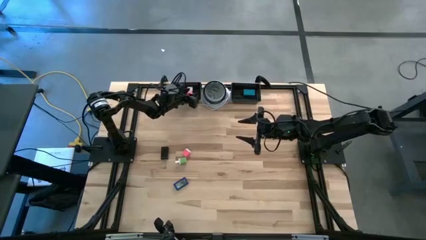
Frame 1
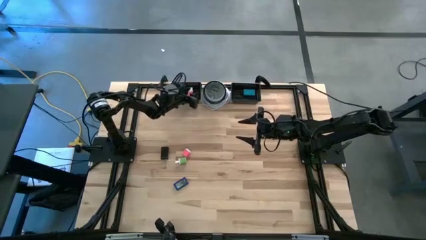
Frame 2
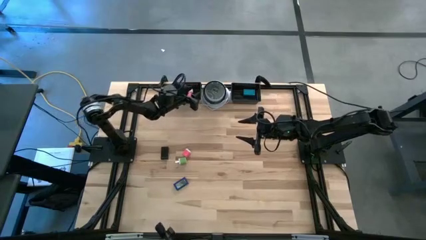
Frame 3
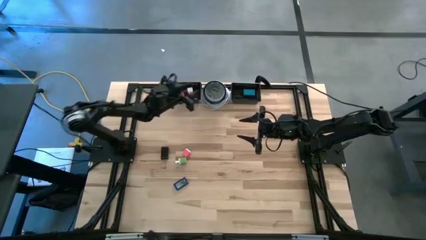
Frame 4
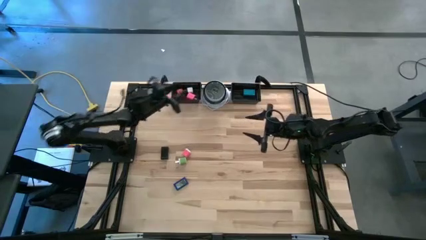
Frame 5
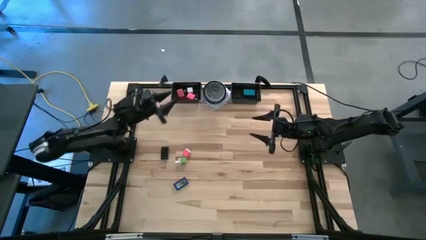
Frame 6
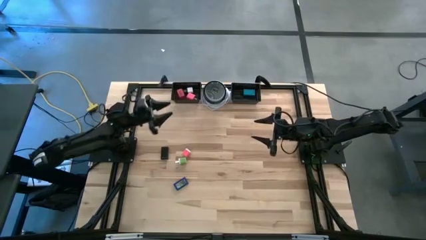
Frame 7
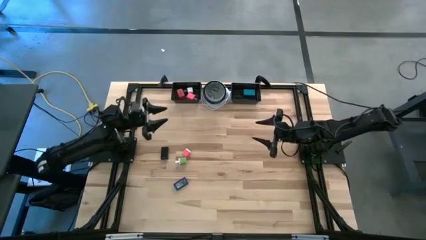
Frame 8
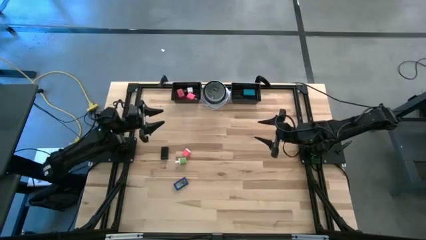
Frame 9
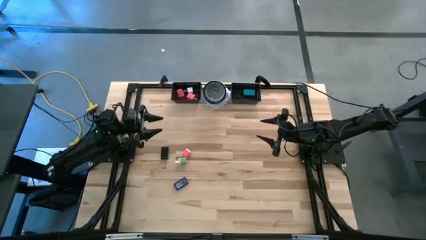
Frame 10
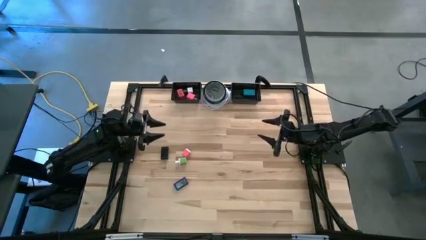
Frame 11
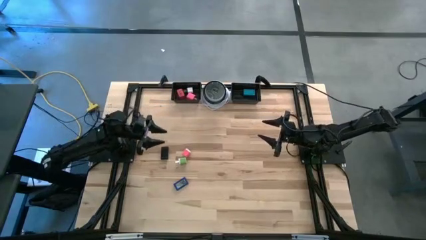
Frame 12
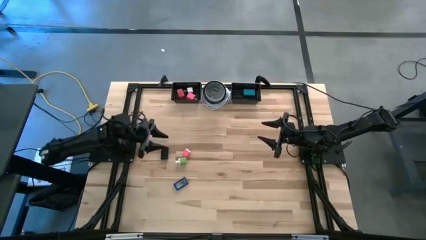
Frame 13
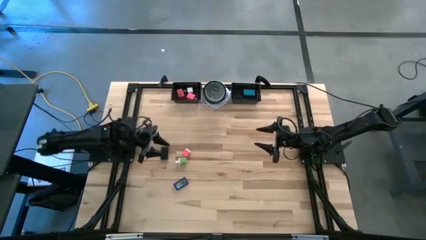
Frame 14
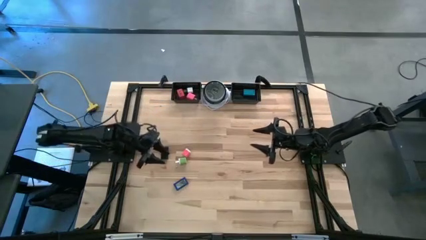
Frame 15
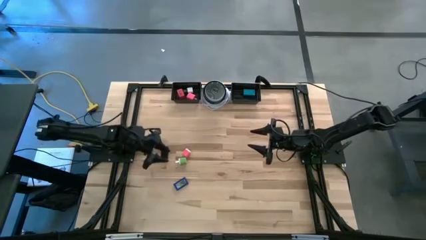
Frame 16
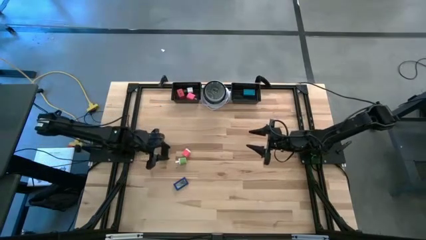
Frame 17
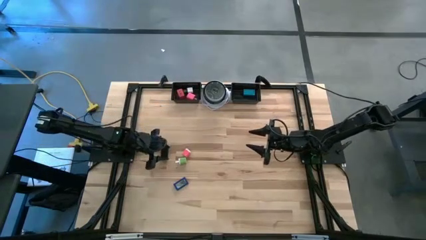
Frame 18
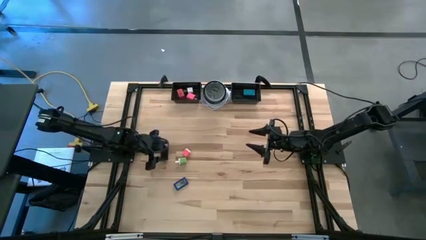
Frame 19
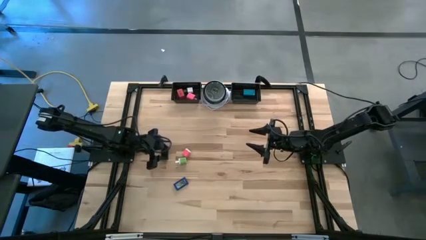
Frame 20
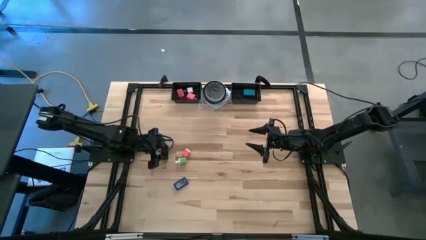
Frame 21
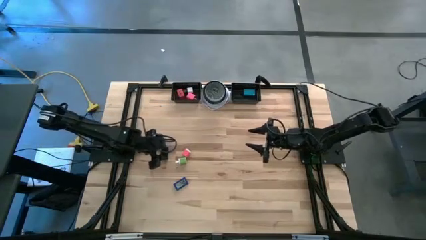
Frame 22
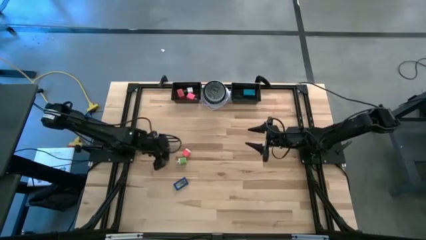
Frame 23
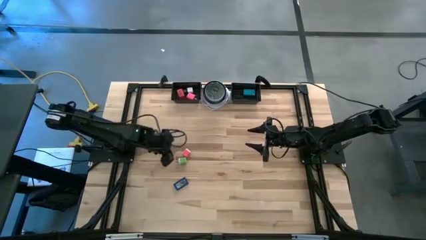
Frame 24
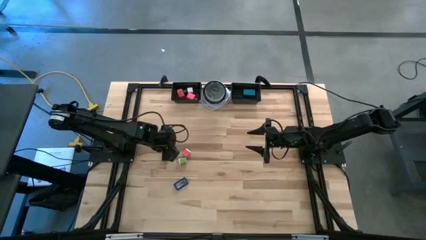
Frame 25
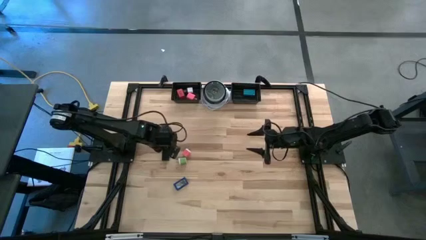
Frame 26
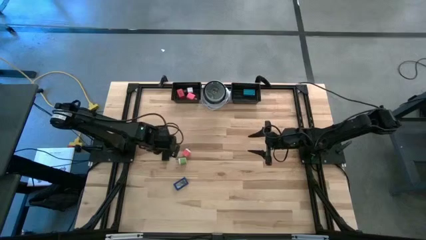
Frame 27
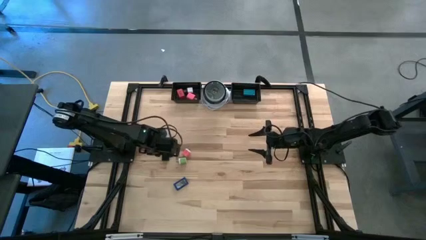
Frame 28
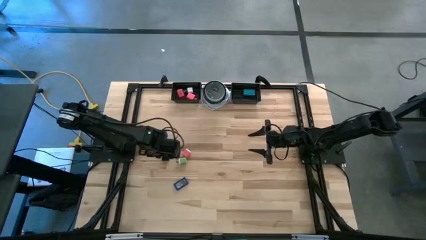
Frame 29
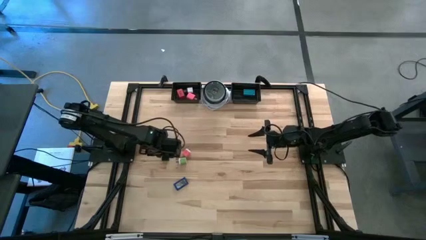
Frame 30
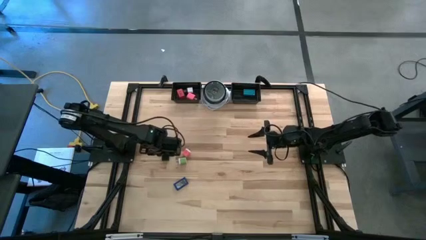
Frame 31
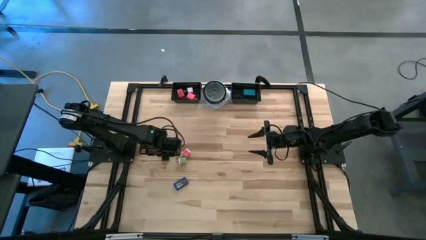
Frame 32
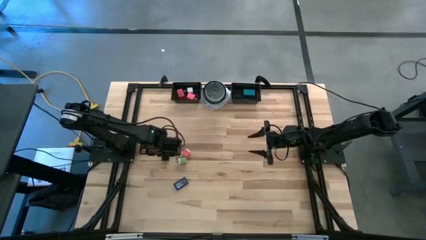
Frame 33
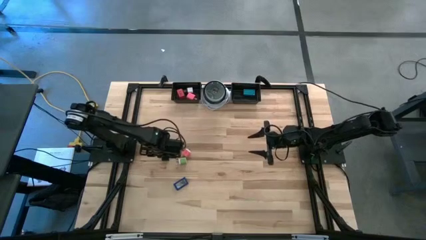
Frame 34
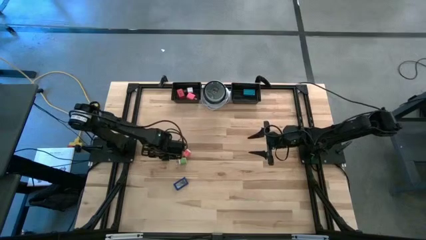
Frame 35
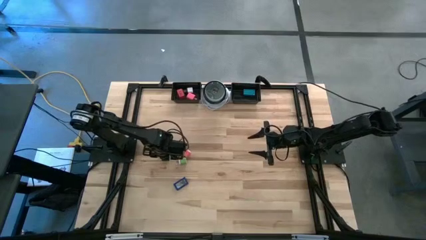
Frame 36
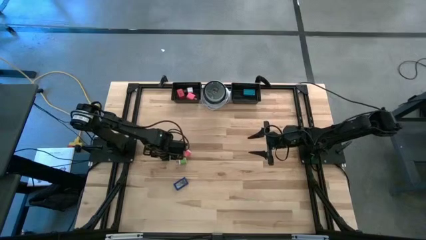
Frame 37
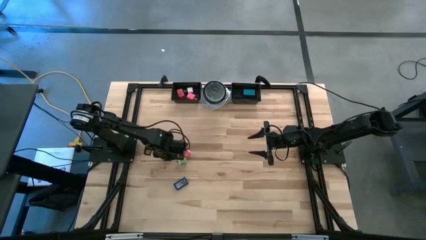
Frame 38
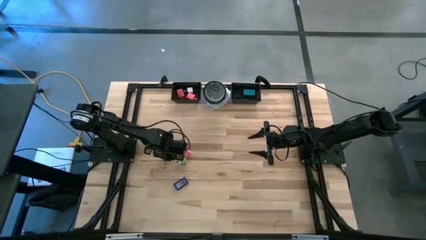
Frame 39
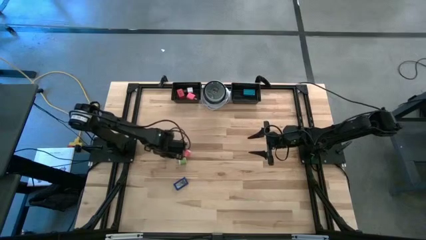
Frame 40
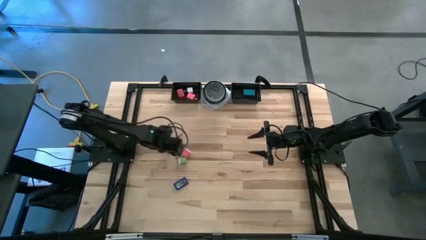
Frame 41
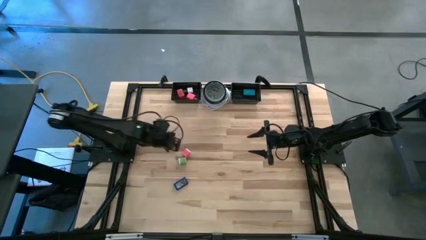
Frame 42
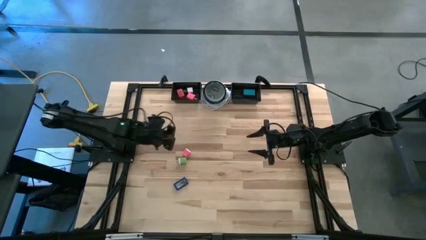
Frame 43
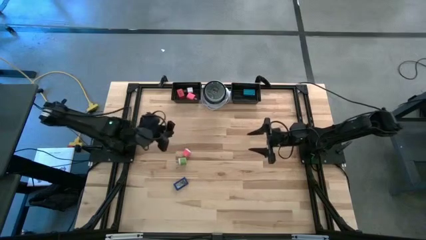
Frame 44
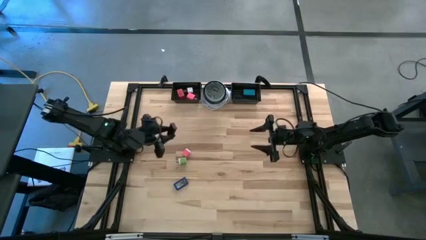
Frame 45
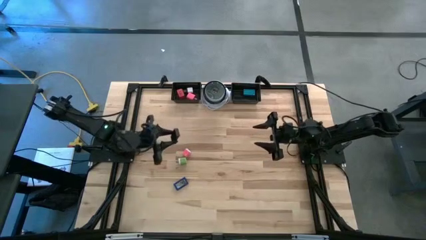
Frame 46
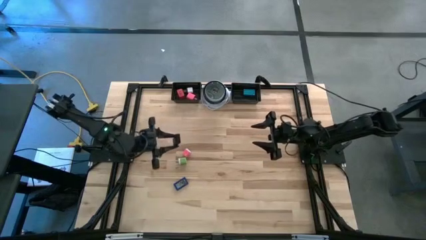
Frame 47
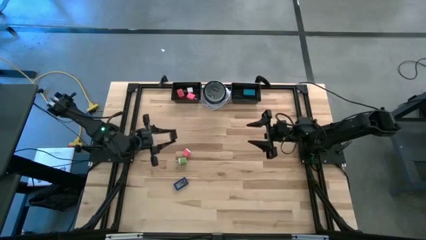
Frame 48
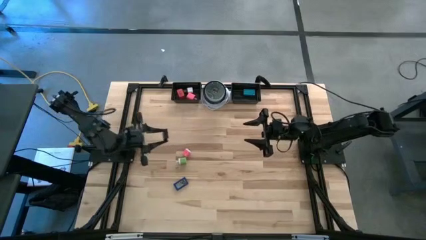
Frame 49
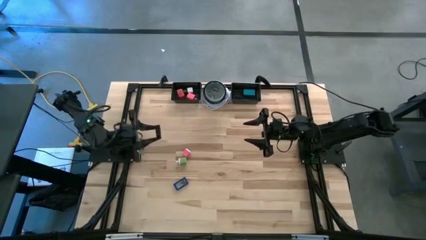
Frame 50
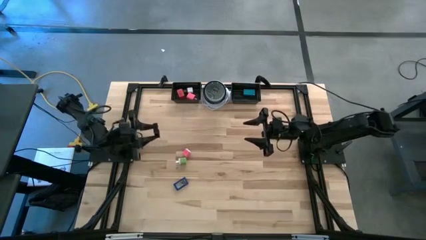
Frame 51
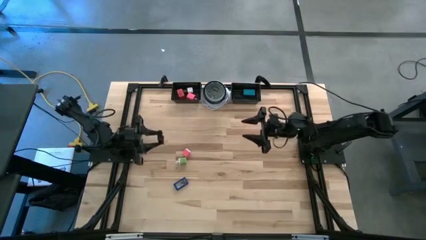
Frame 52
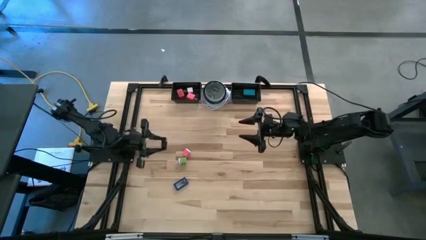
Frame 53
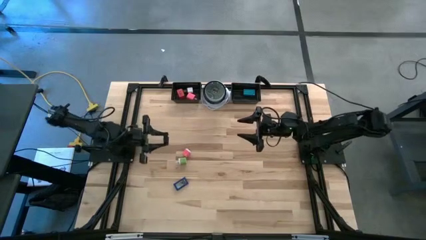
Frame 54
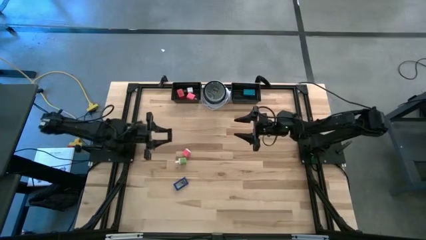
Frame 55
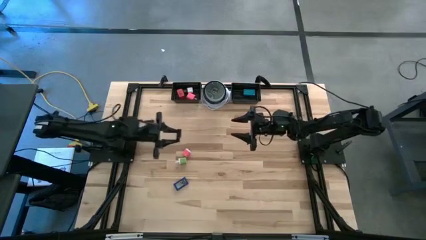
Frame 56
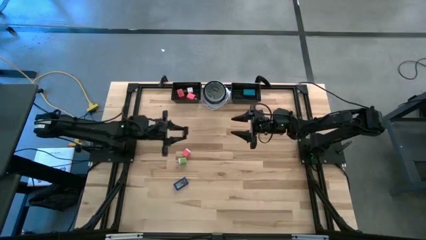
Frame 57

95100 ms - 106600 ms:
Task: Pick & Place Office items
Put the black digital clock into the right black basket
